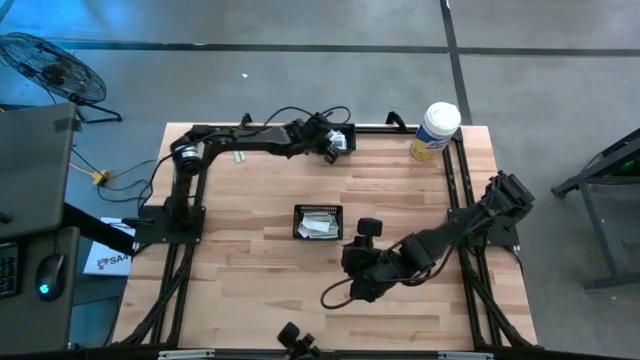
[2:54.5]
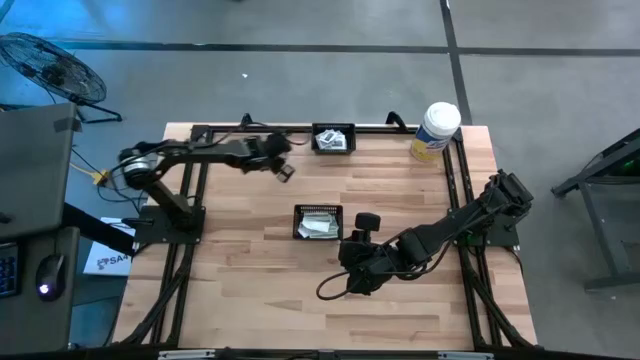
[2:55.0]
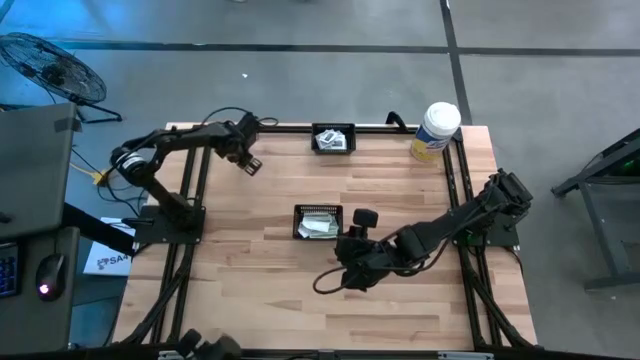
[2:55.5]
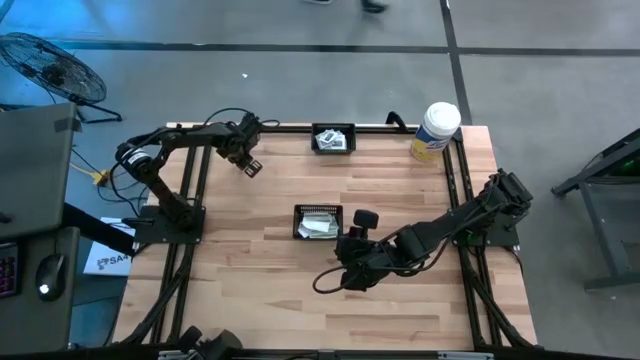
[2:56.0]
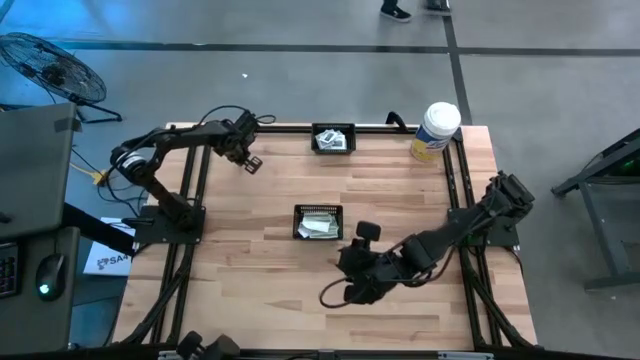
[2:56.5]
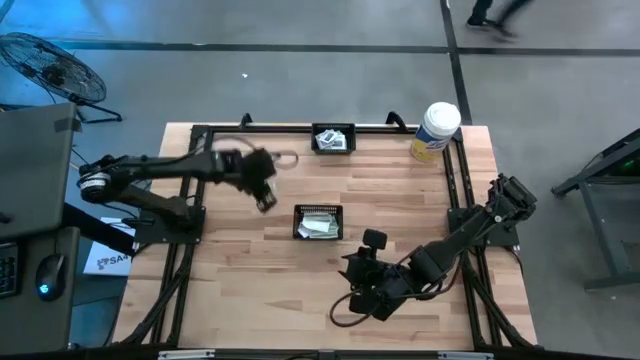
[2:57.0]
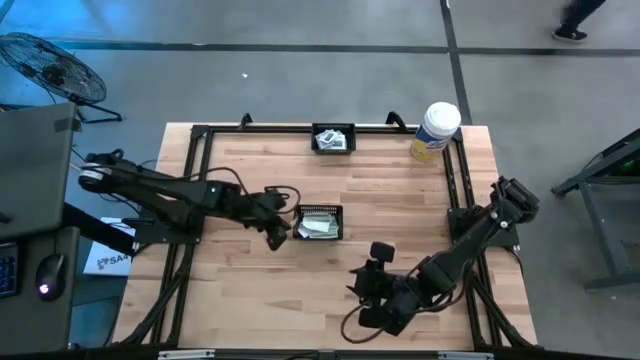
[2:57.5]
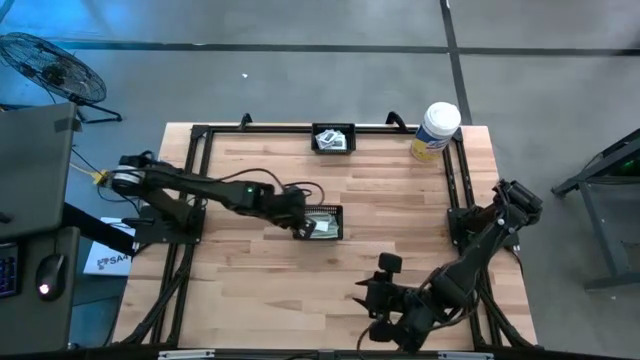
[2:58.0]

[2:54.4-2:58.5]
Task: Pick & Place First Aid Supplies
Put the bandage into the bottom black basket

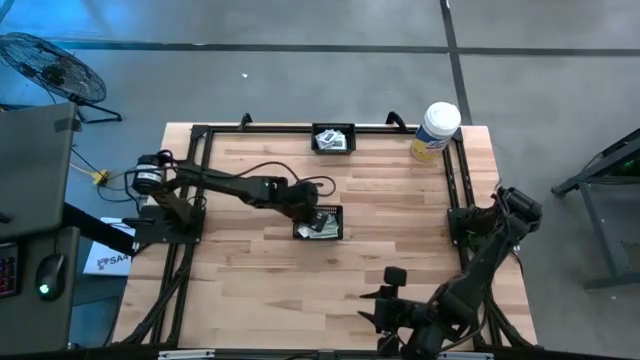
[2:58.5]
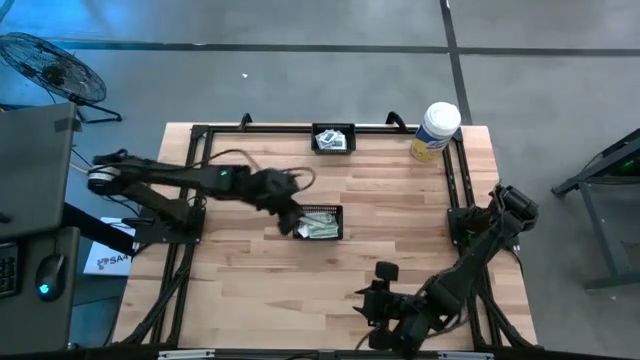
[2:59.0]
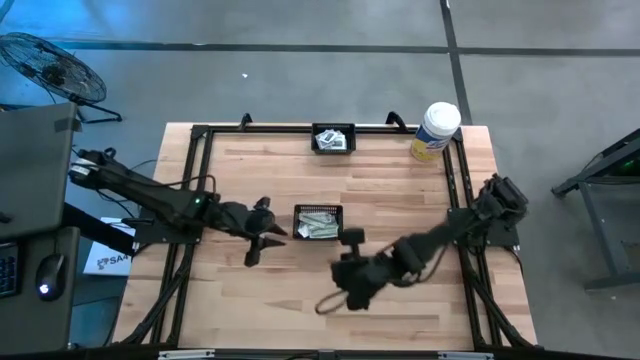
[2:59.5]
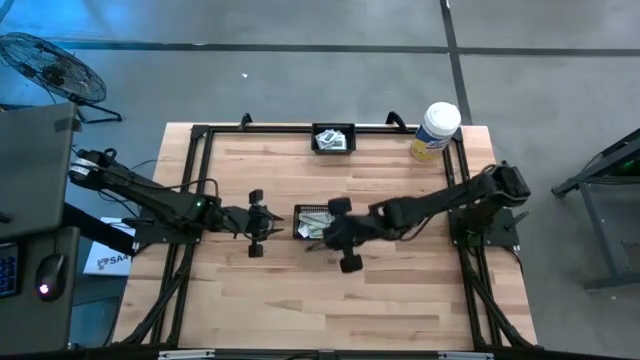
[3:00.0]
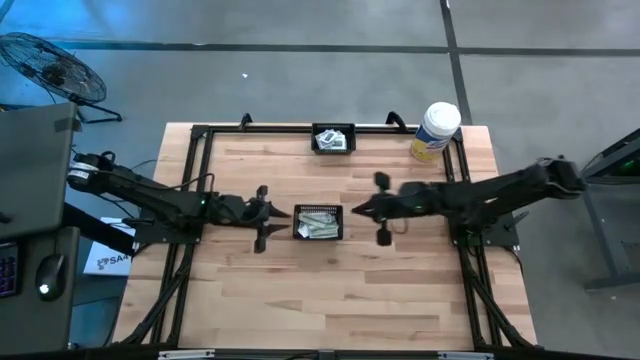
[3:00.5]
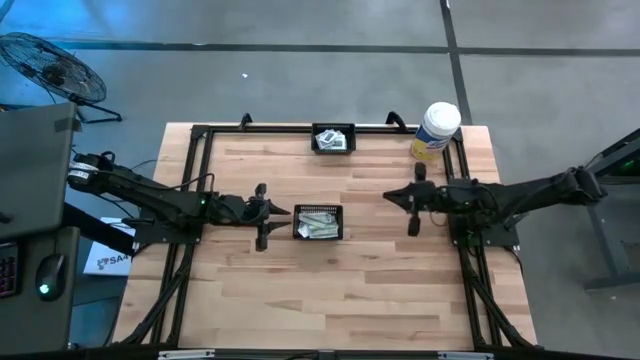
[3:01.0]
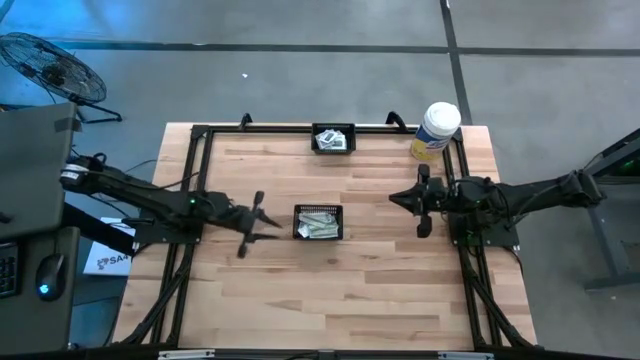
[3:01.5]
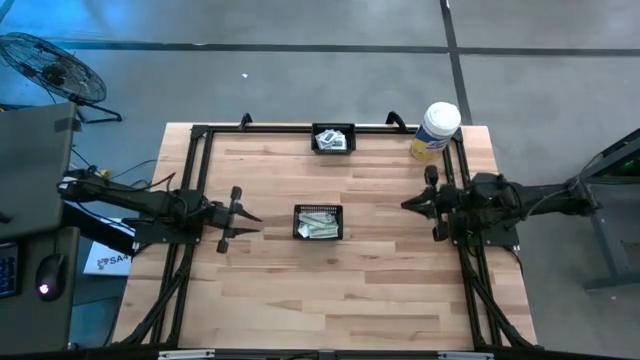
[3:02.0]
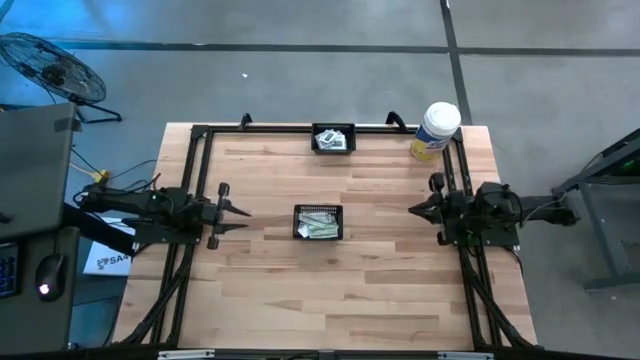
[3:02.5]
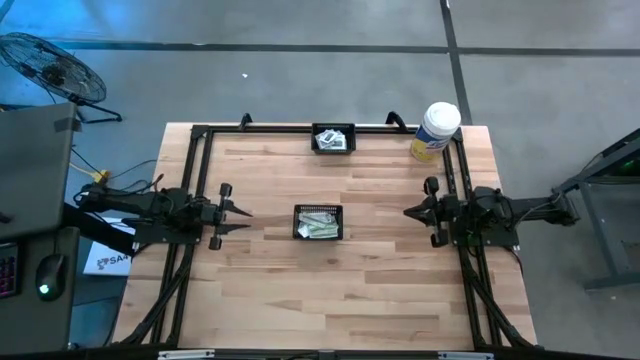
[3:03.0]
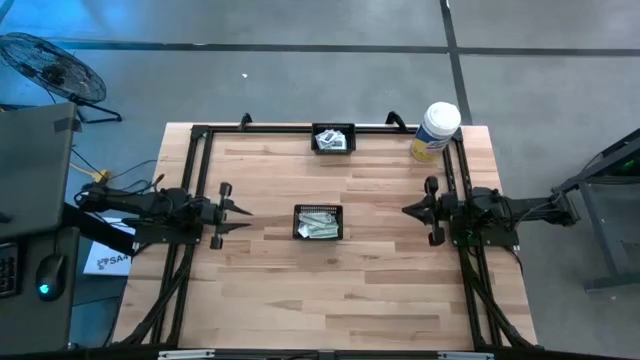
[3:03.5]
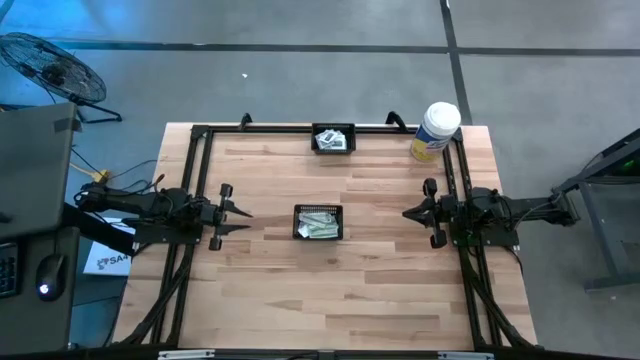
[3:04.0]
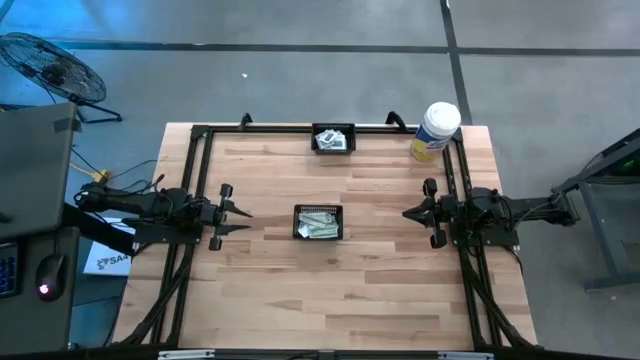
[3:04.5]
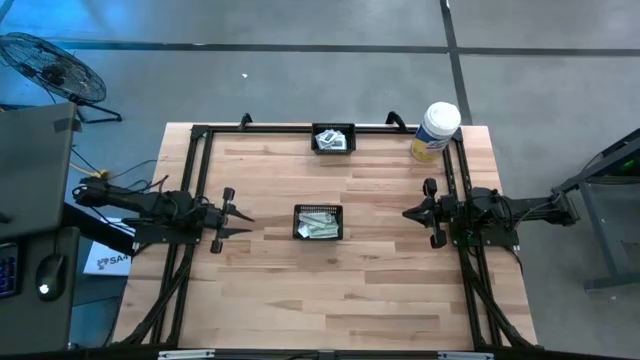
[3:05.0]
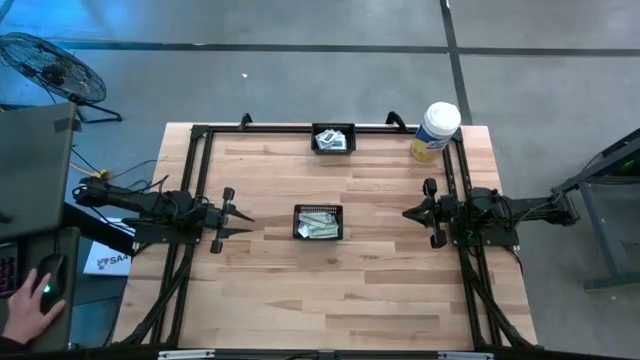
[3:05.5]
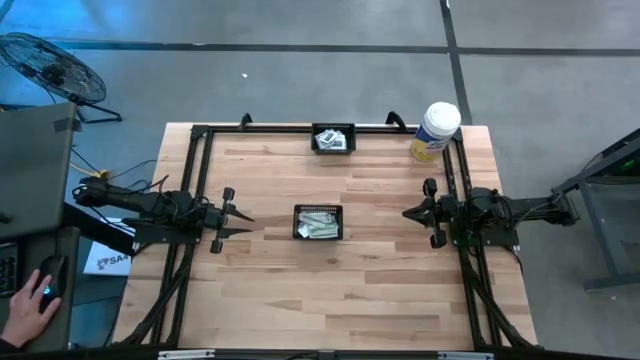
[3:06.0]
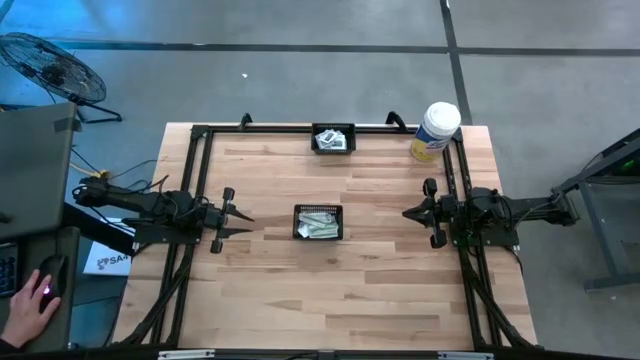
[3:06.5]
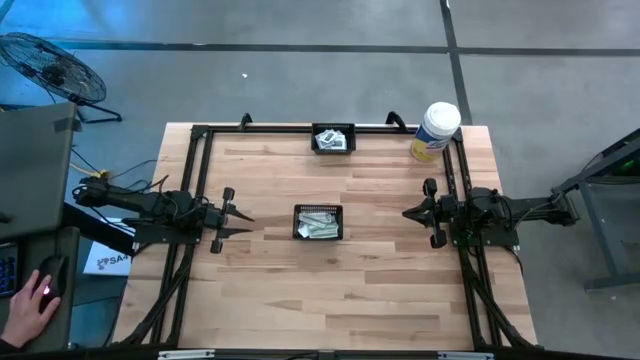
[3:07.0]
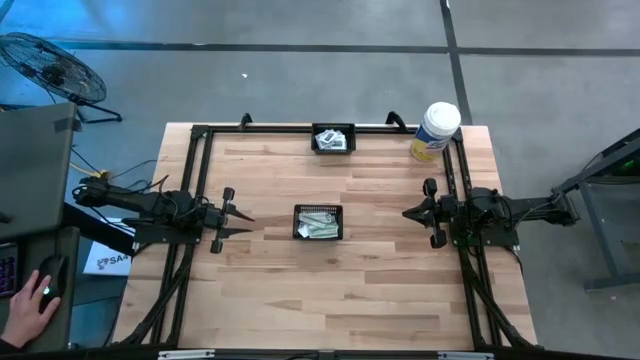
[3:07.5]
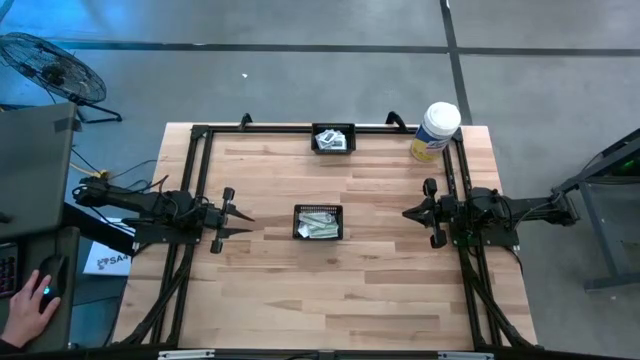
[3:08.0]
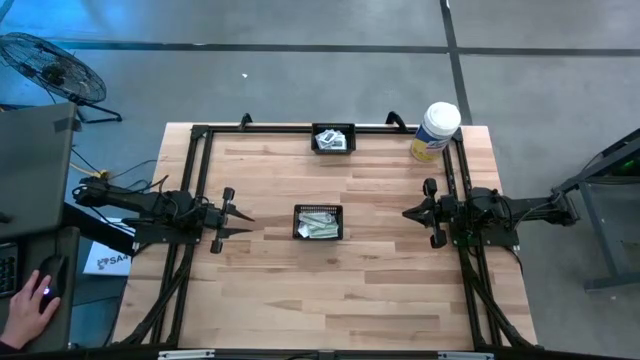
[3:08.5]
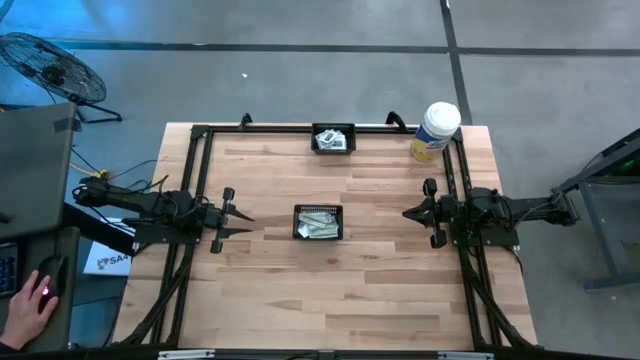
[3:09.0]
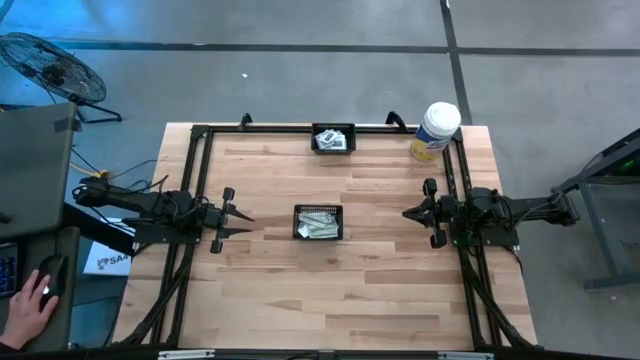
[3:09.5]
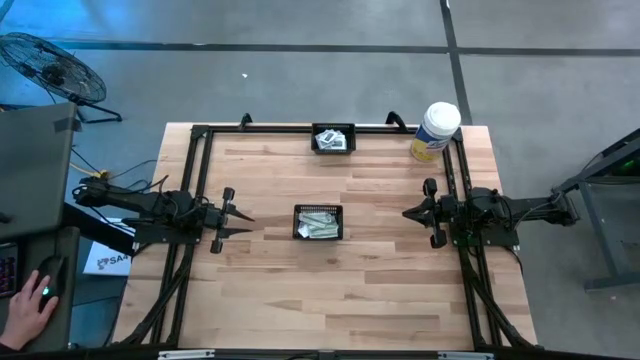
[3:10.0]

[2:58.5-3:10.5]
Return to Home Position
